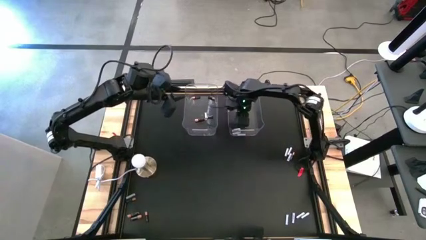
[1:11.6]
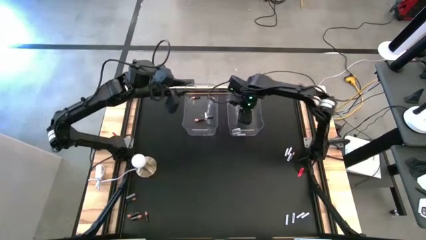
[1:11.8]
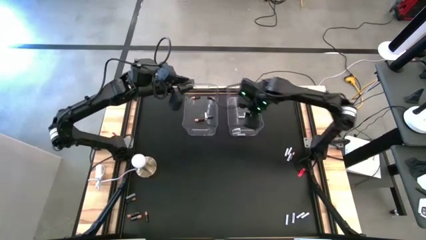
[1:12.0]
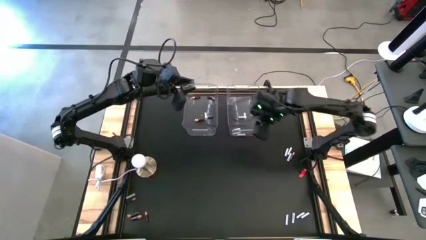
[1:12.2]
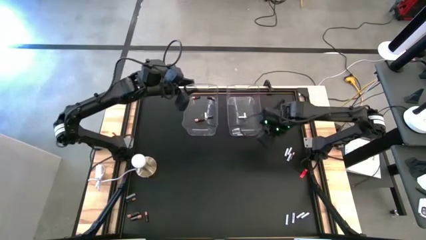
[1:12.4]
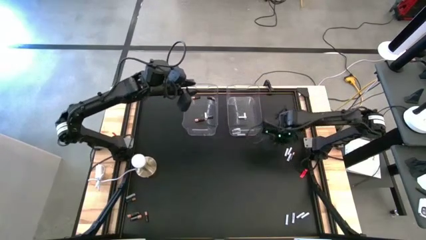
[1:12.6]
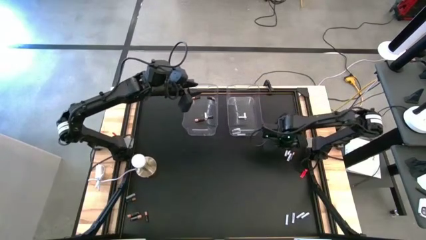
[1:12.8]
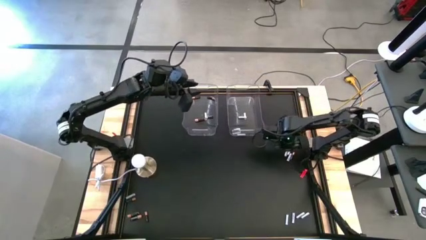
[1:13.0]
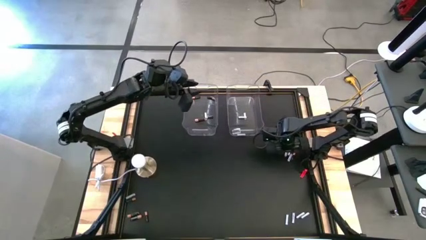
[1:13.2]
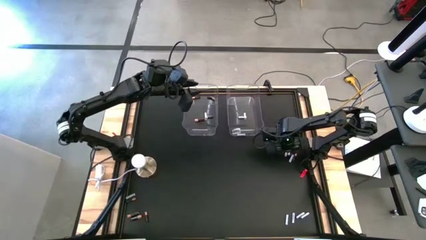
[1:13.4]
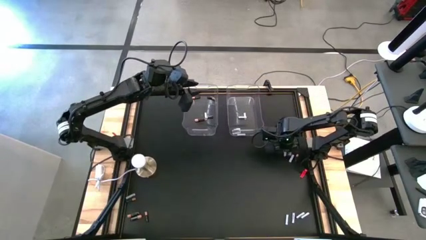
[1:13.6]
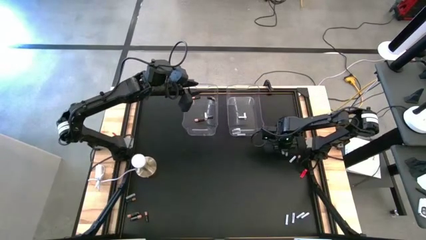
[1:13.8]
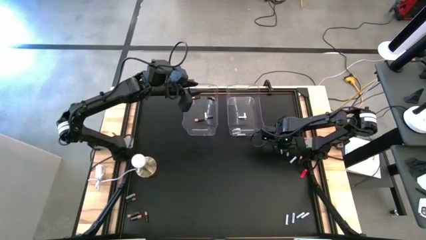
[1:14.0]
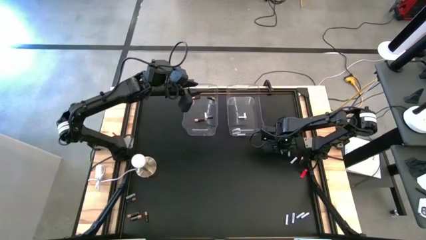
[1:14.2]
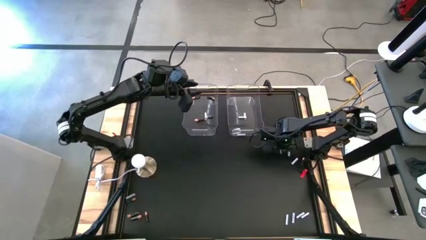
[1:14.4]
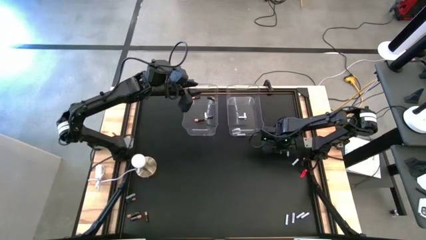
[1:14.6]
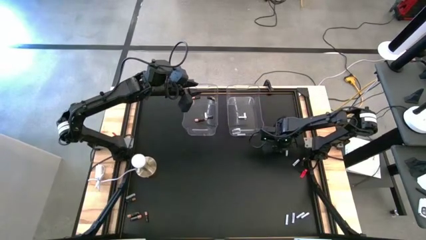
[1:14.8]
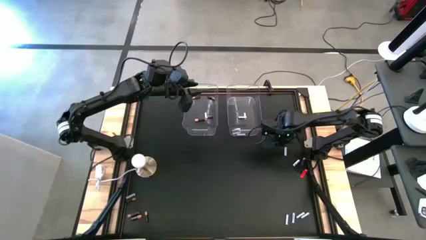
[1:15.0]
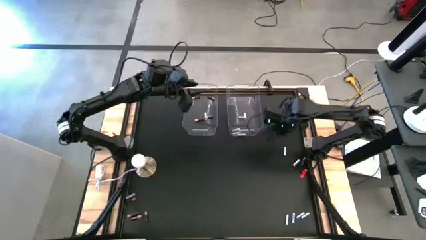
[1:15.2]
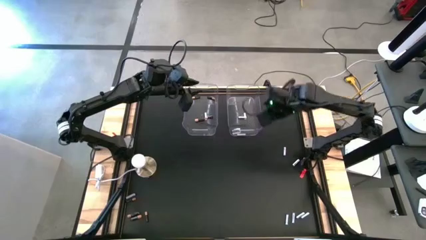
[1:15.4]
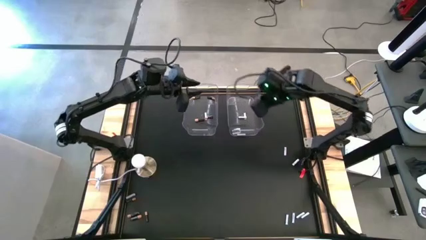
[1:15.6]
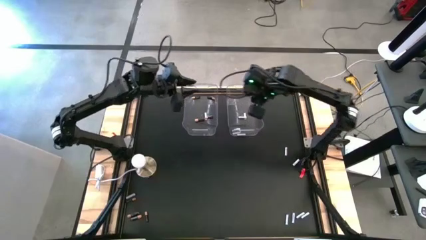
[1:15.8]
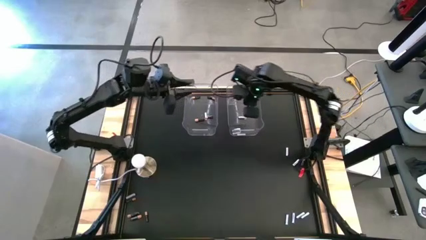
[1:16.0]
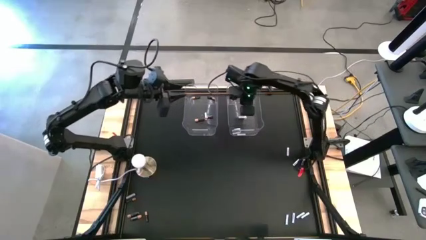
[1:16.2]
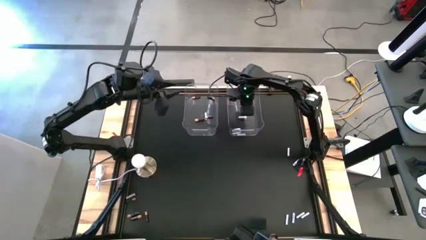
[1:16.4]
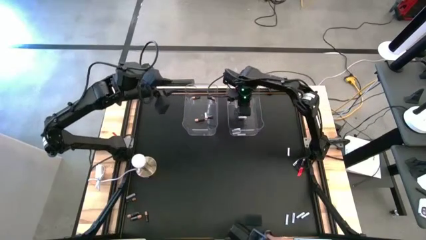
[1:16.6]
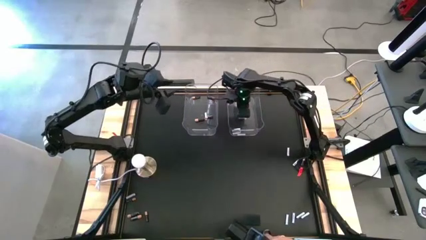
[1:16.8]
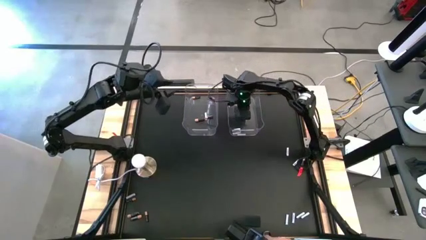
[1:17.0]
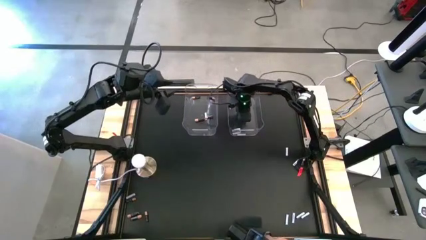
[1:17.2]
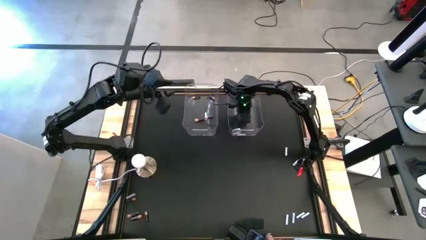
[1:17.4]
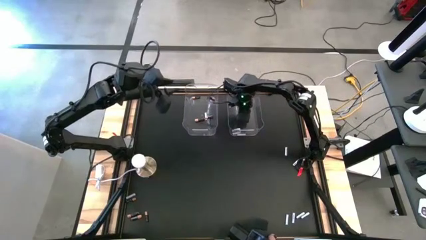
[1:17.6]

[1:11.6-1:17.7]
Task: Sort batteries
Put the white battery into the right transparent bin

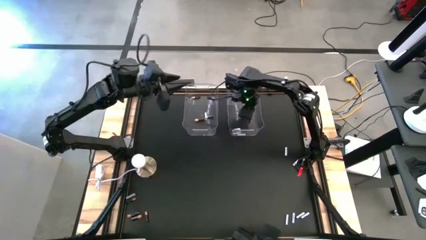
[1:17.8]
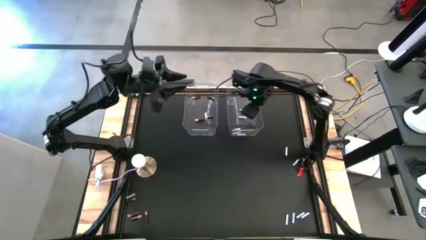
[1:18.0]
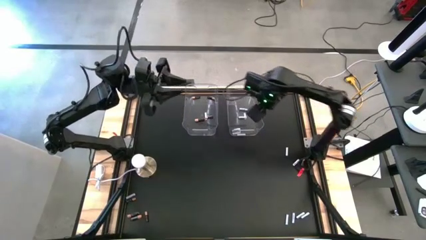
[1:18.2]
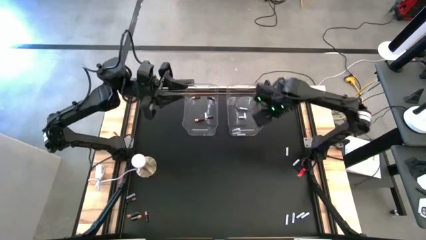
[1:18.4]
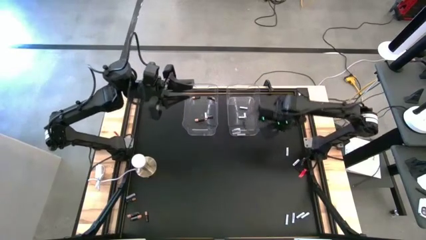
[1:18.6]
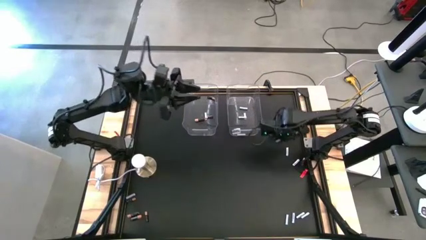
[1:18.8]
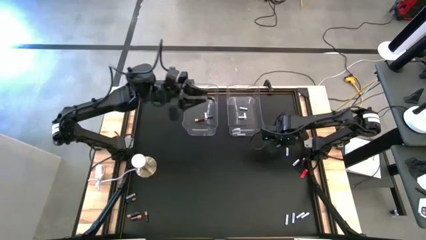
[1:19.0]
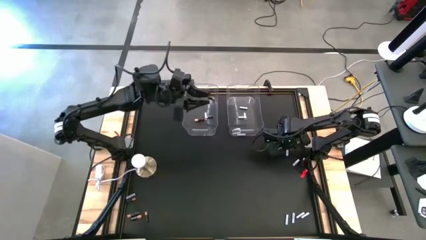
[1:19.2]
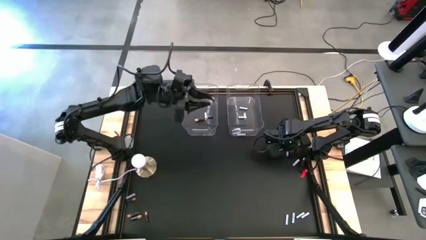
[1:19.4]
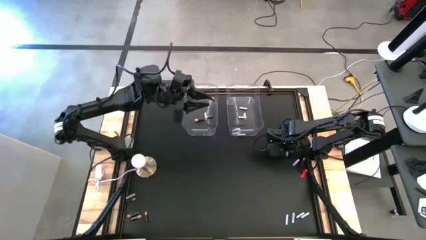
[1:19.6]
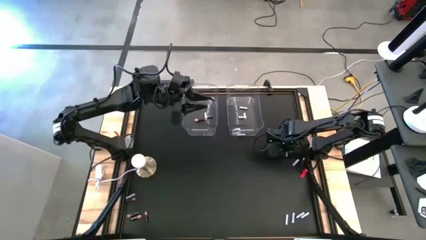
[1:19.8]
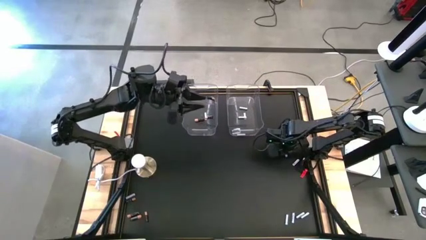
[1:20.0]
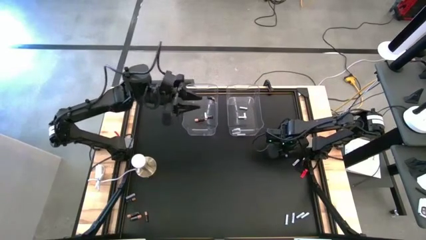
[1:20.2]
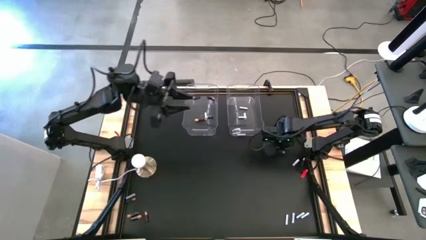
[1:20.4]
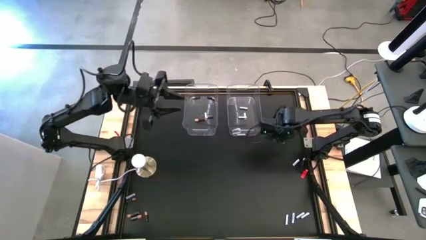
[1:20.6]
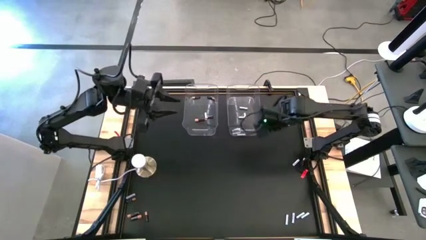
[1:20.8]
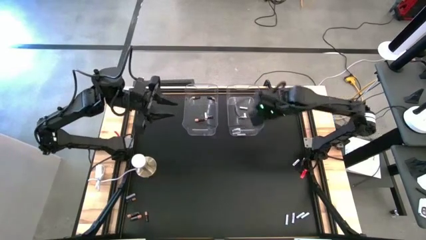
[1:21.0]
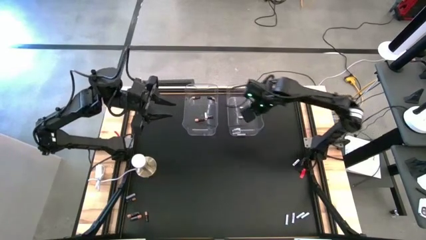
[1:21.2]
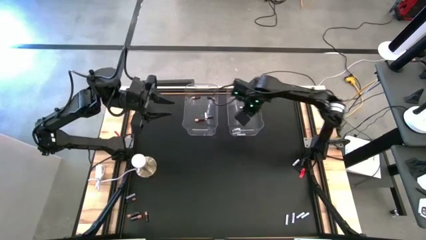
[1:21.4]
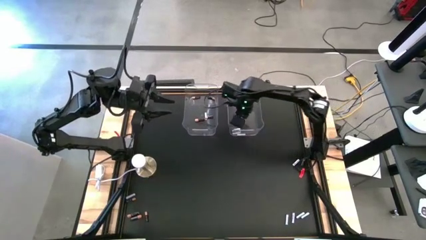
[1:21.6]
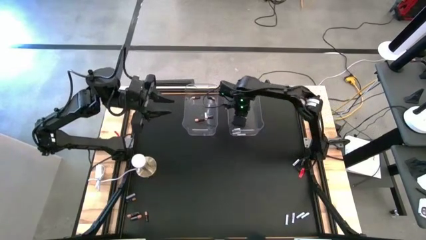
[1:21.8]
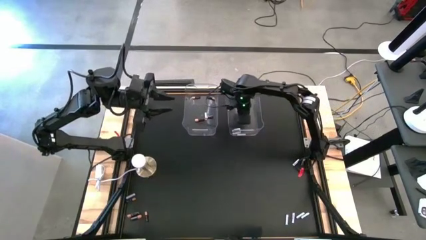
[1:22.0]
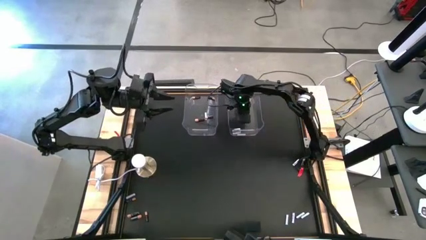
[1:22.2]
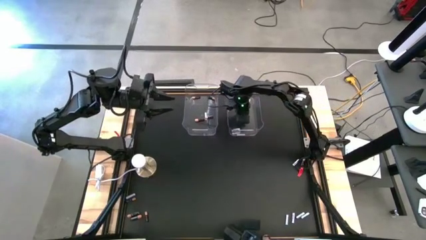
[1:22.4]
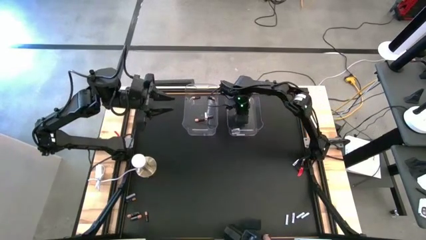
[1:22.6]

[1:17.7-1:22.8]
Put the white battery into the right transparent bin

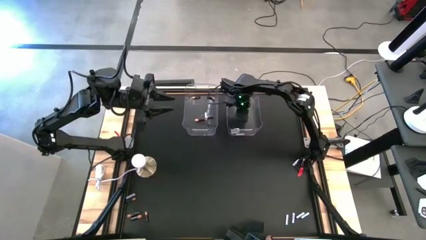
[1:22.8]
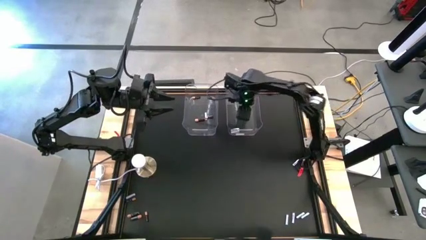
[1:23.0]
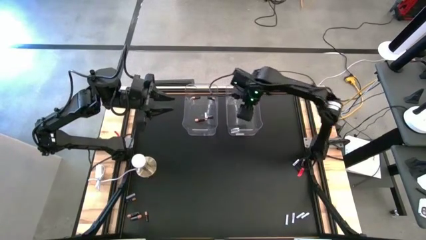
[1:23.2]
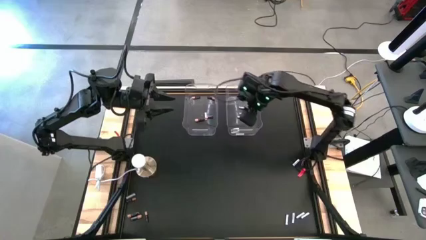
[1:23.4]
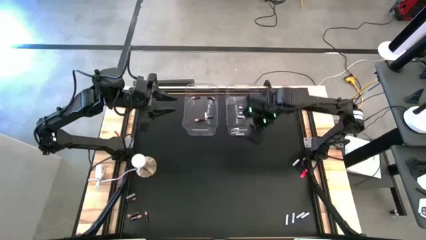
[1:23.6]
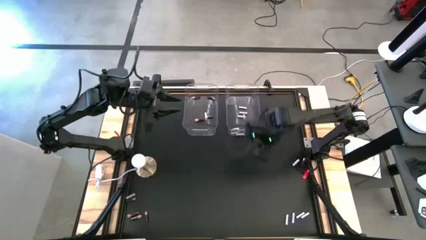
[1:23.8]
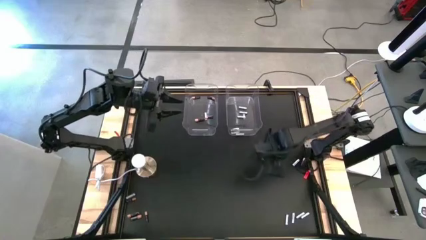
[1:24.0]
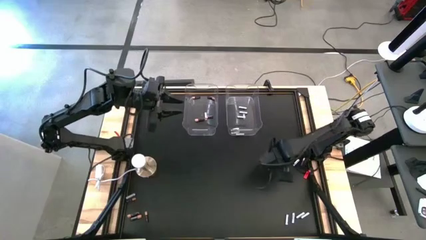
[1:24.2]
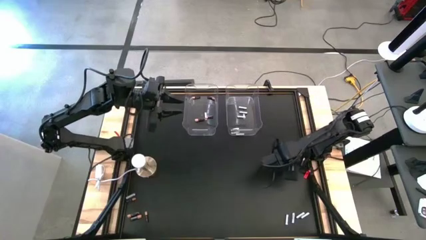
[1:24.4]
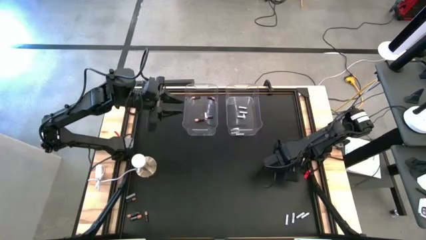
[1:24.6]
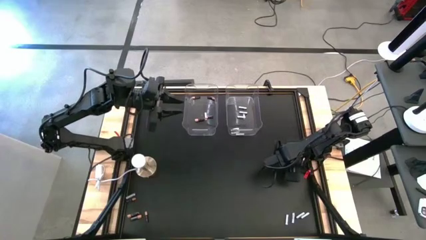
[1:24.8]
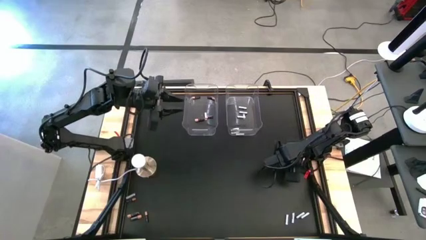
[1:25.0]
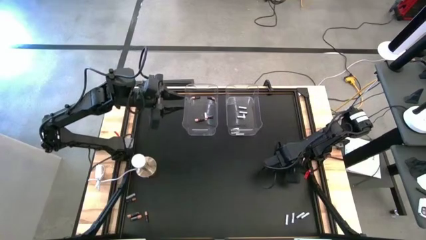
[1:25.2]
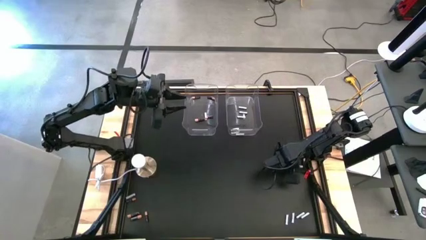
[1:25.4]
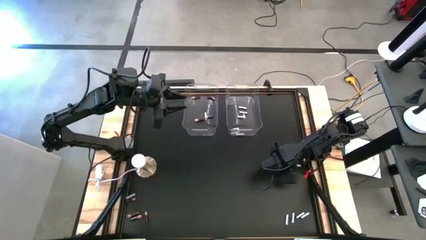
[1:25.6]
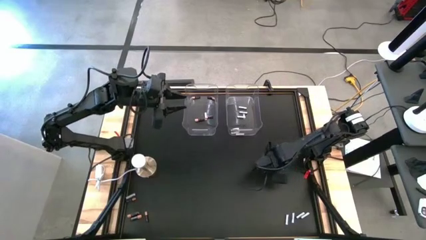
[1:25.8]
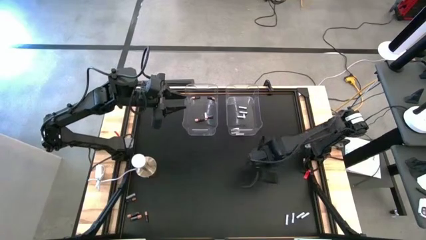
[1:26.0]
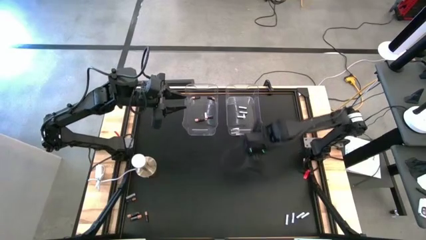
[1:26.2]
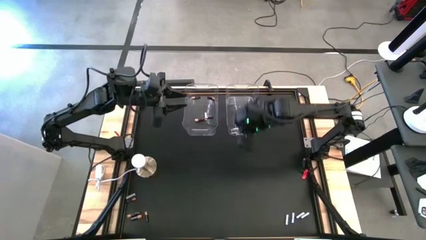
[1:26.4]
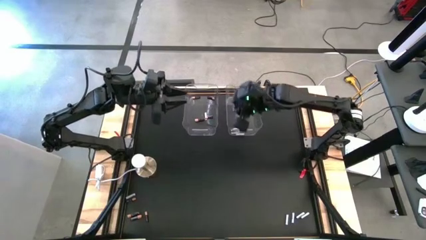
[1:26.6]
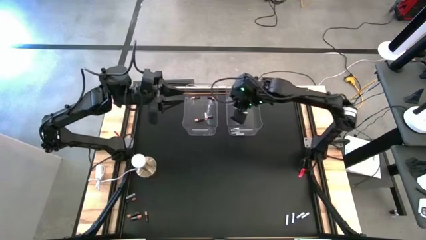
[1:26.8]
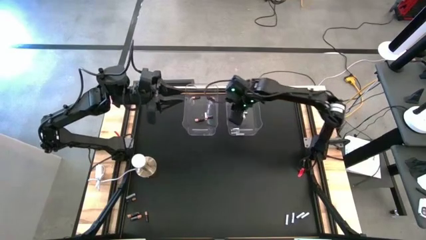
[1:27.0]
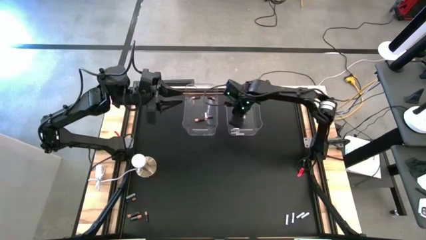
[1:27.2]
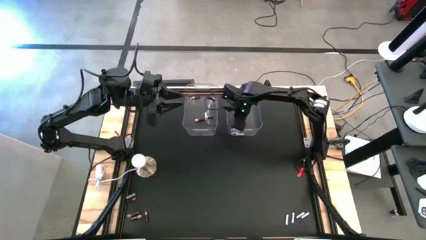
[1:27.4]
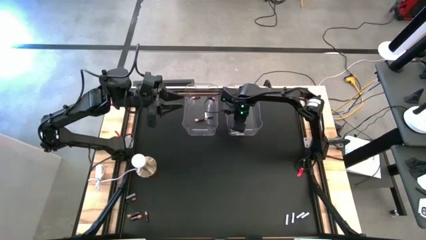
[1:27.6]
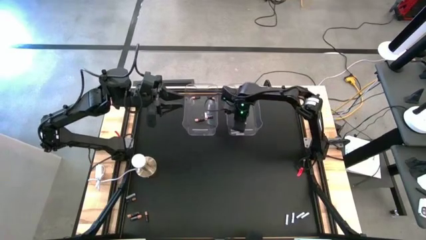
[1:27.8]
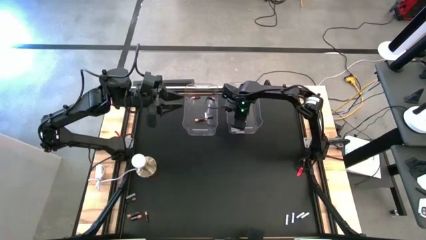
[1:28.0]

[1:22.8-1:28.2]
Put the white battery into the right transparent bin
